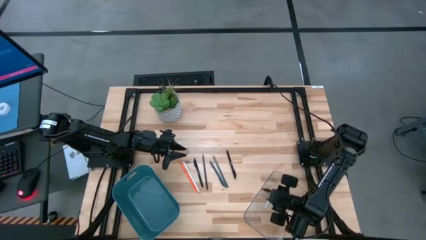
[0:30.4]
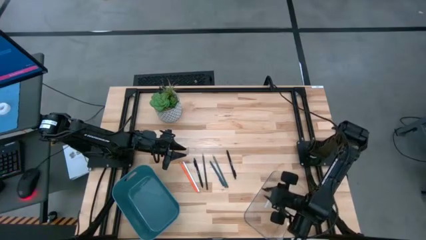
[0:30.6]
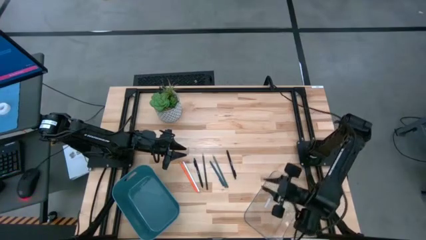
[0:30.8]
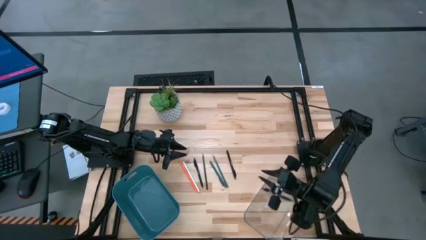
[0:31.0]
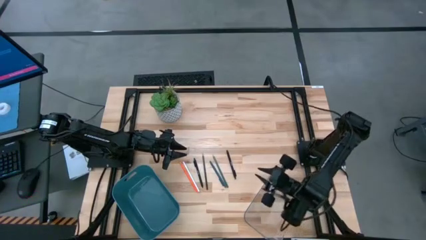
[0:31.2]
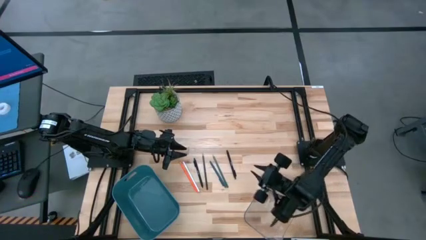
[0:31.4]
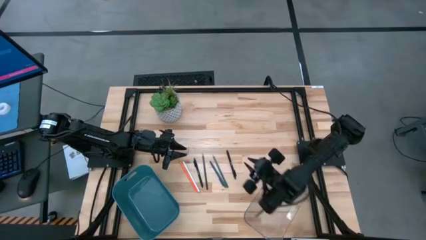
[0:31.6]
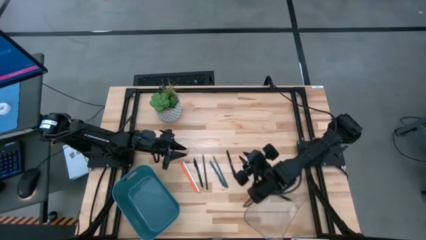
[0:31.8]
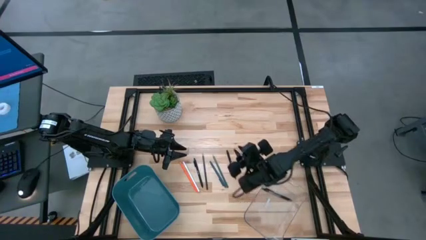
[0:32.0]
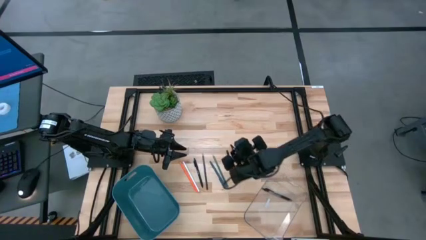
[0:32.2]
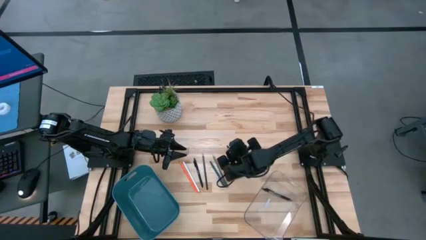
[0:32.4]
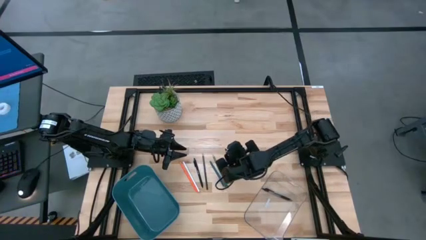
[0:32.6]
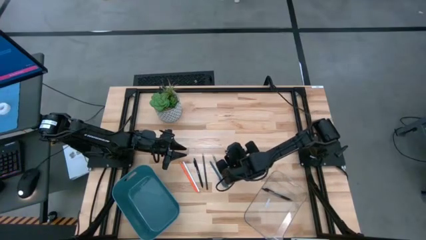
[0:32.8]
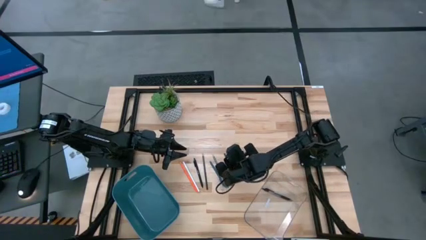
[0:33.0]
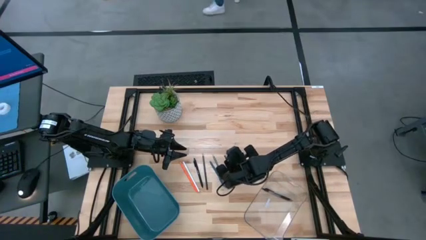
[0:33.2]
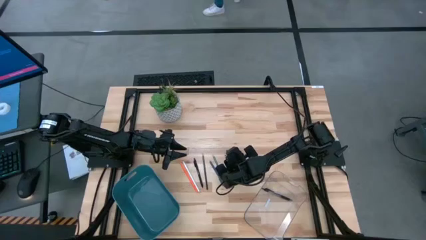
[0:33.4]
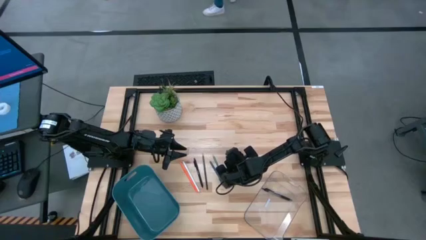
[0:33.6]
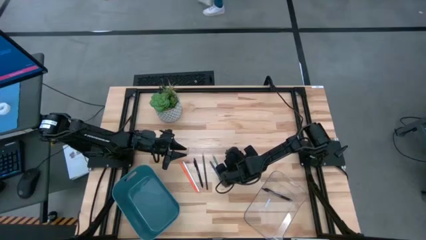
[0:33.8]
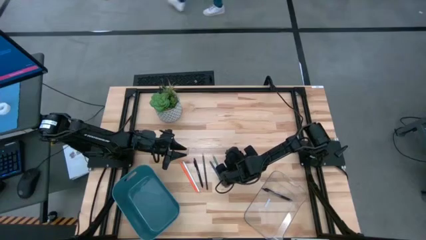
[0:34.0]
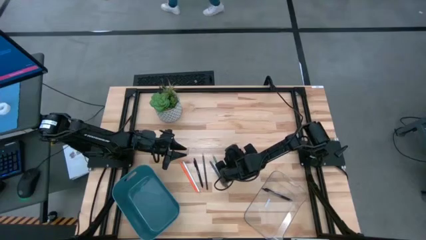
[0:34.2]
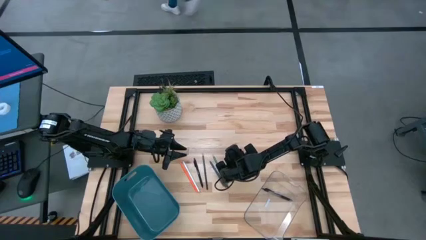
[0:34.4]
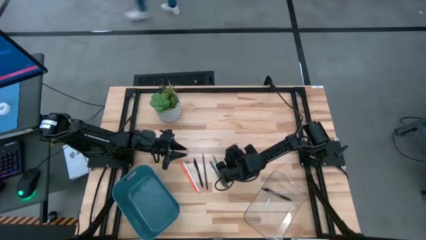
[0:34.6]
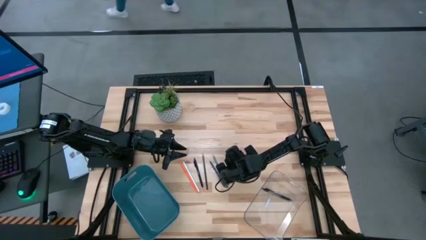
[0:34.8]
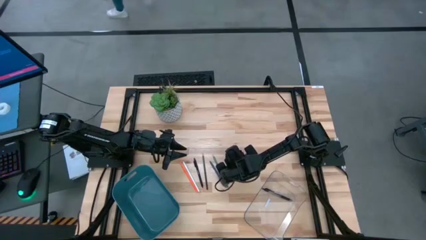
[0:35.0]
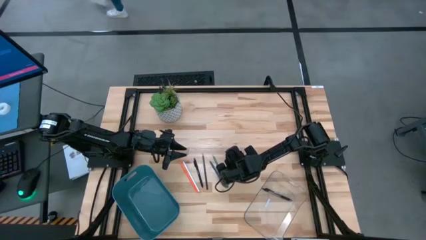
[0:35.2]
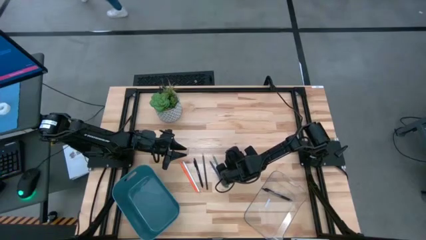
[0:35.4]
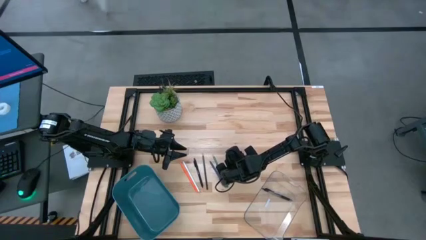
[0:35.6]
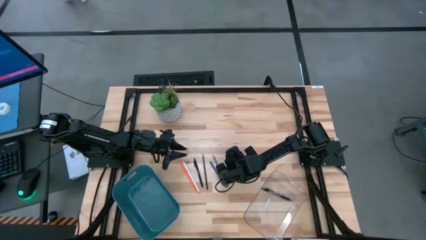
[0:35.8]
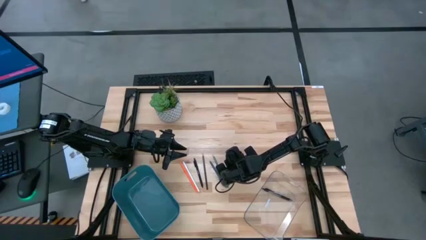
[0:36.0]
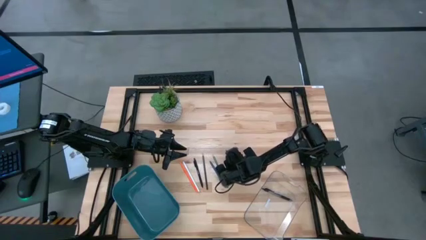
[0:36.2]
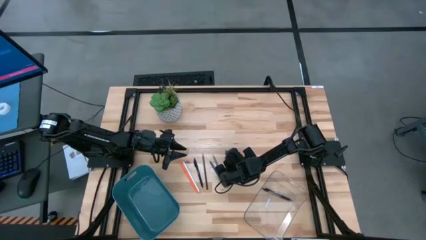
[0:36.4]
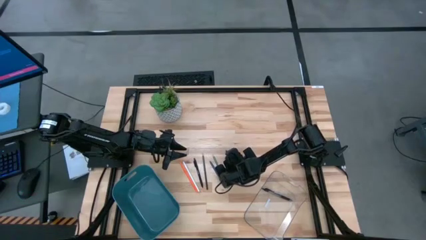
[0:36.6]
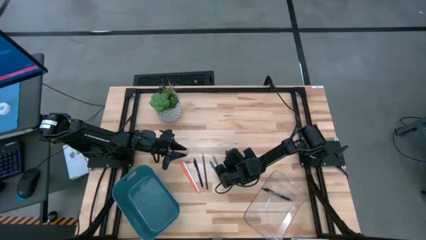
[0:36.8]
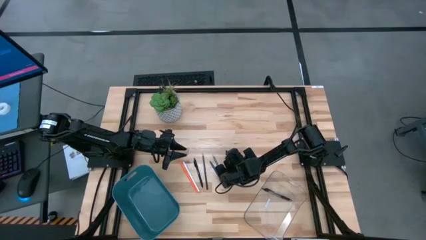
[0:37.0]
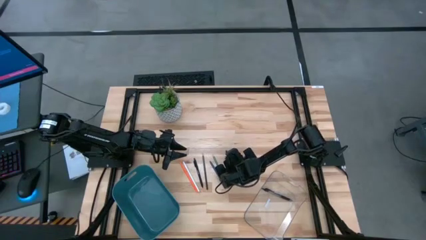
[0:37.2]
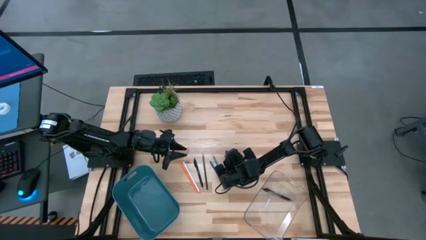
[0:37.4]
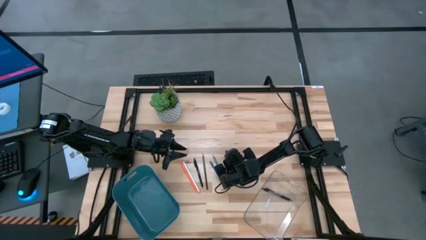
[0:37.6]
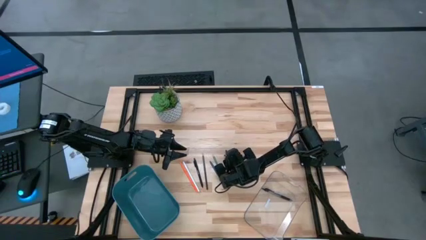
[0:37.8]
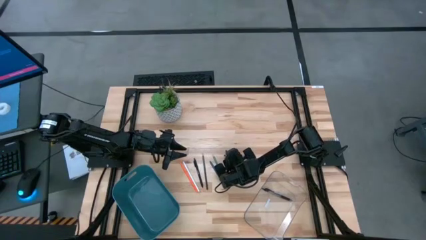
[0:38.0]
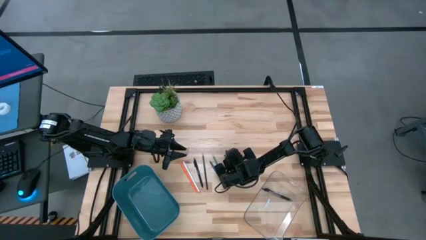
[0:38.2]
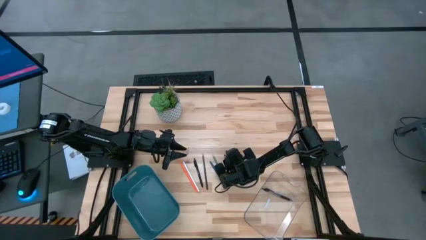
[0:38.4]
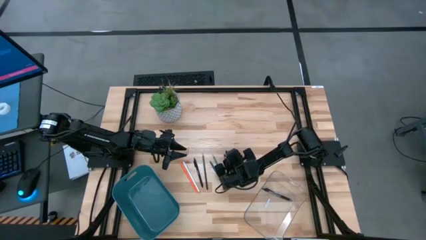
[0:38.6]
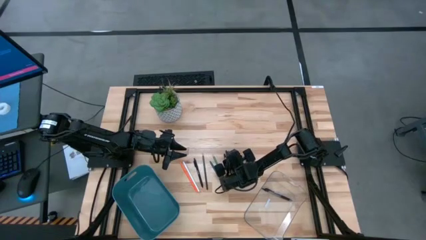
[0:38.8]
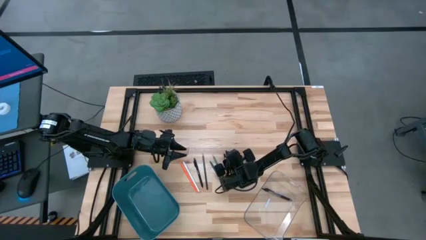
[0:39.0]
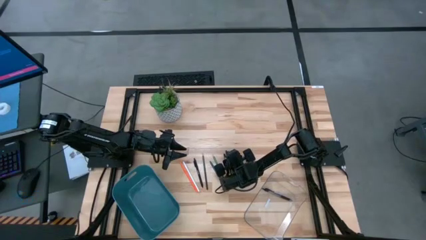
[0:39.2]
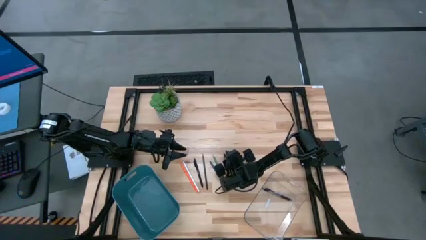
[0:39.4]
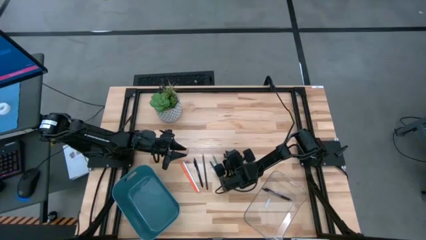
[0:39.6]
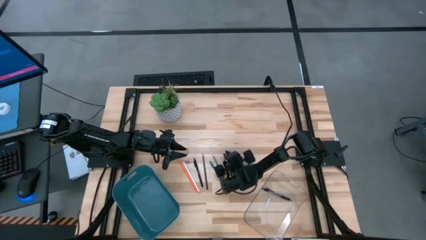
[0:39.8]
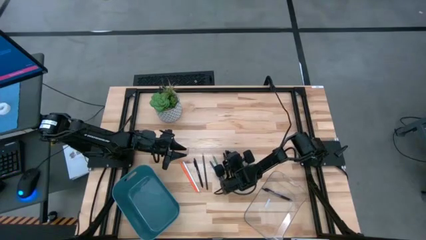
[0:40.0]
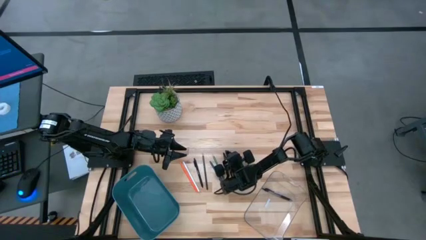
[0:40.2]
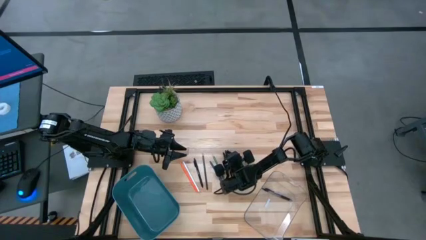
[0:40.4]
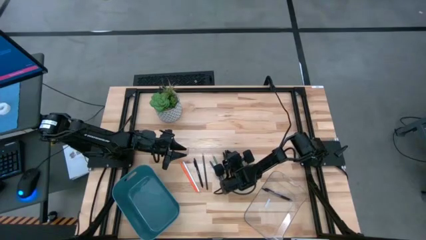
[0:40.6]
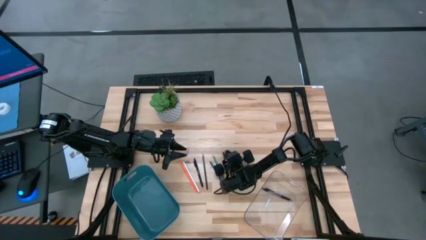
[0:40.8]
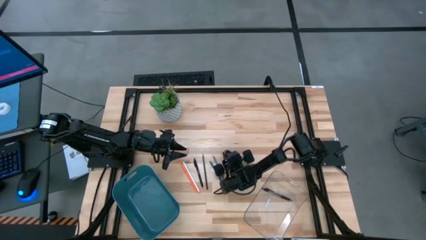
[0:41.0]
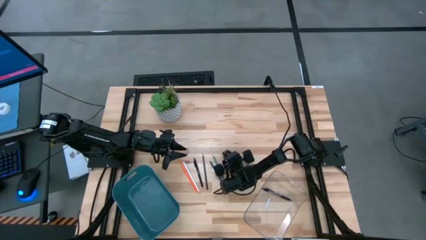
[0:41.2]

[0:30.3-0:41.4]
Task: Sort pens & pencils
Put the right black pen into the transparent bin
